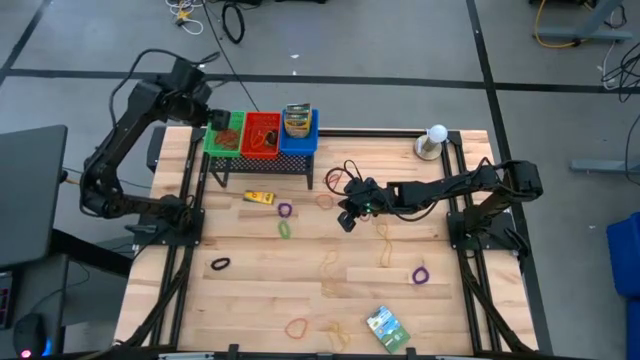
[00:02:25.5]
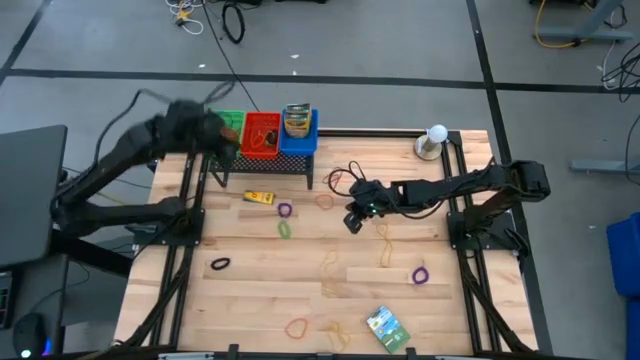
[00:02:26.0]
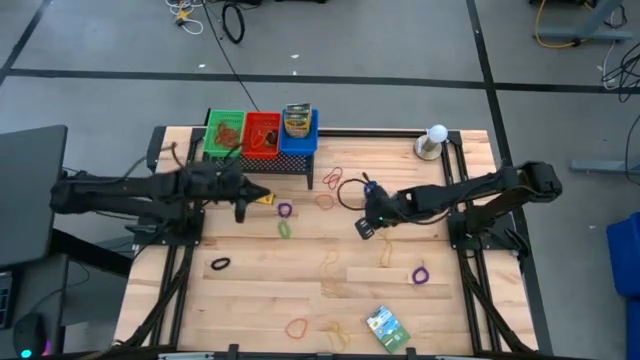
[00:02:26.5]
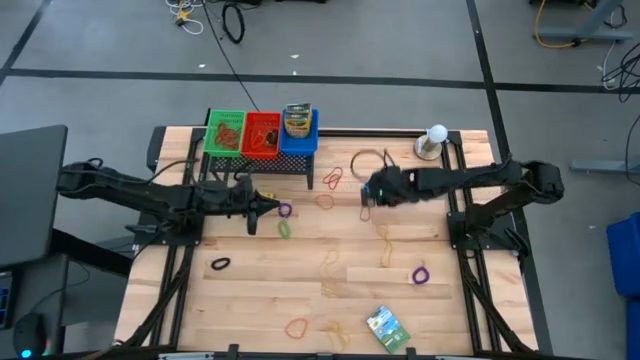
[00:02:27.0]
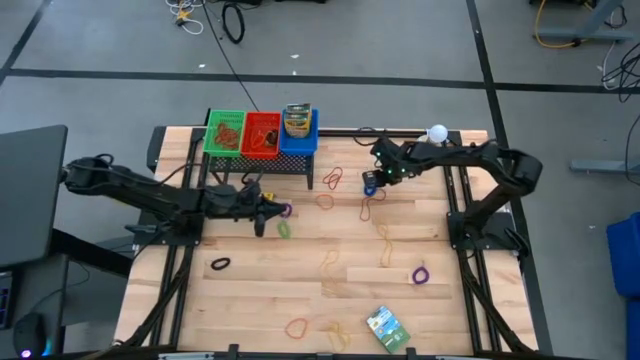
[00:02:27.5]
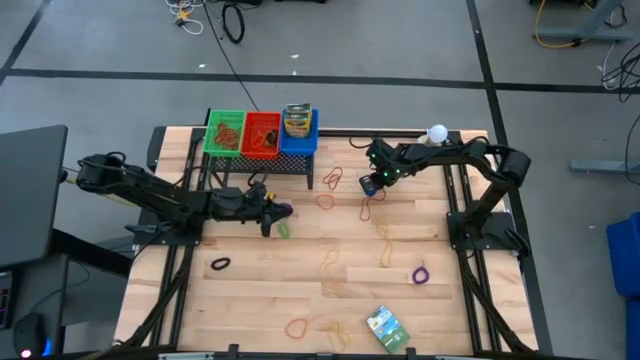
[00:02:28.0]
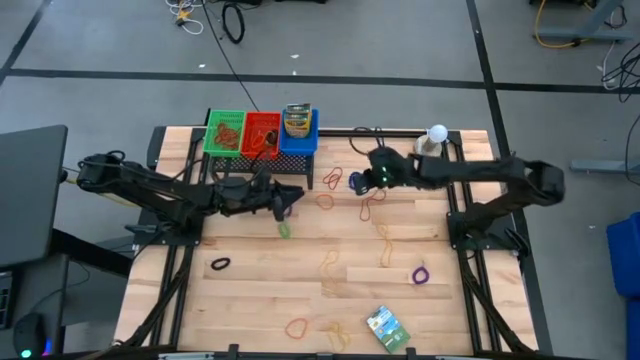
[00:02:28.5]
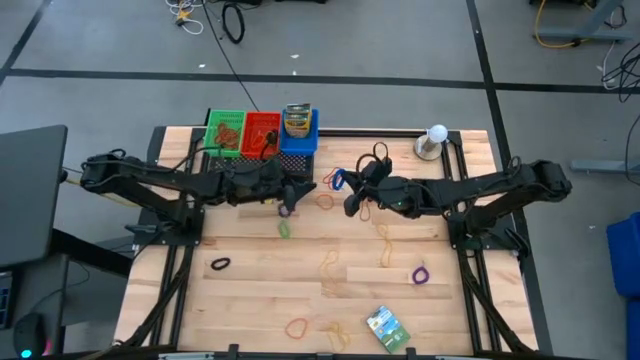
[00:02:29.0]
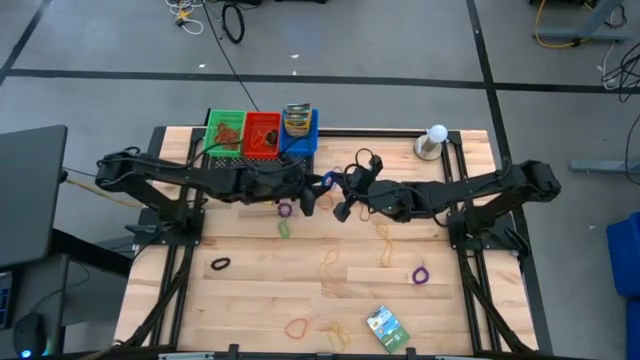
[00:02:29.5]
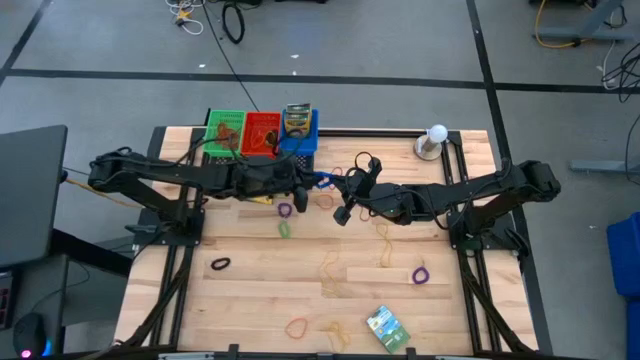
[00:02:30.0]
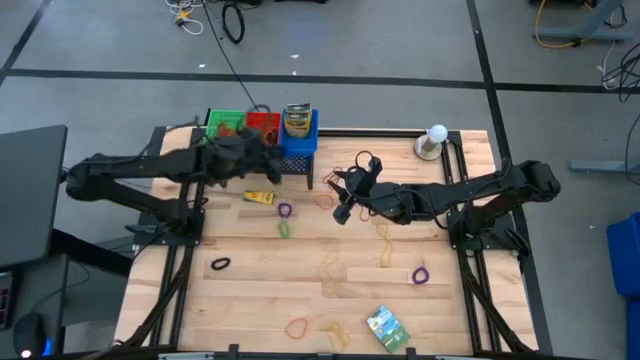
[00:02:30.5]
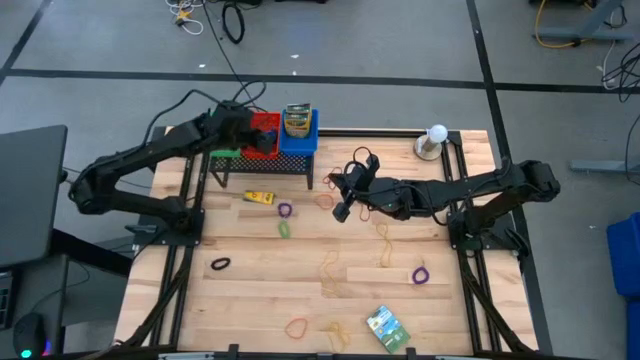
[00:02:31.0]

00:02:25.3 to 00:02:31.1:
Task: Pick & Place Office Desk Supplies
Put the blue spring rubber band into the red bin on the shelf

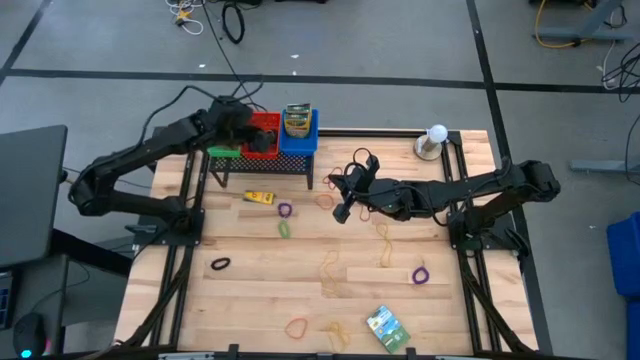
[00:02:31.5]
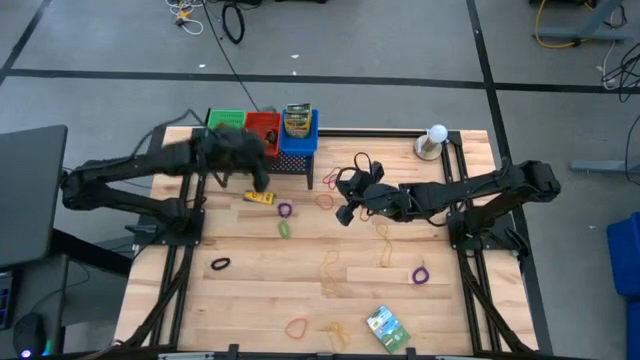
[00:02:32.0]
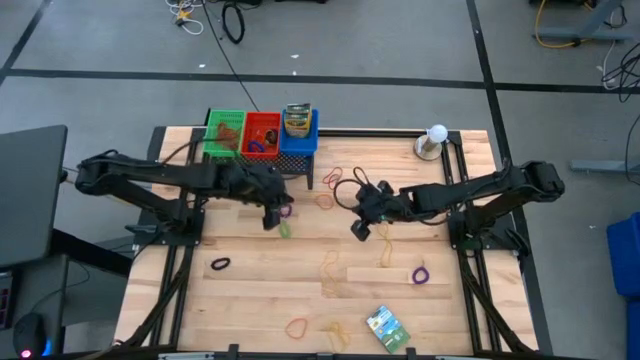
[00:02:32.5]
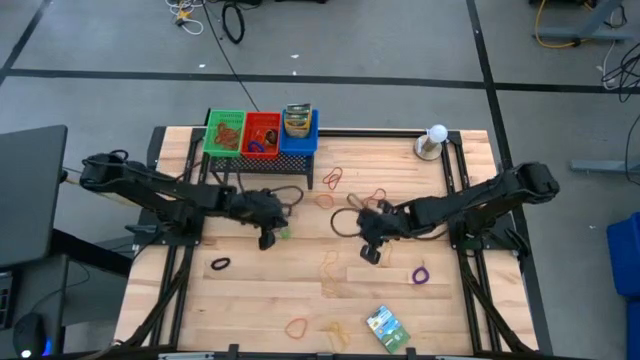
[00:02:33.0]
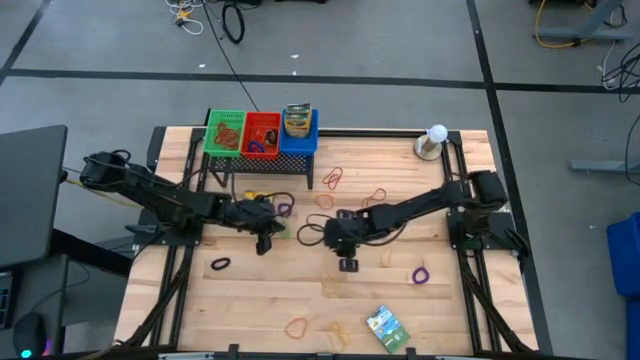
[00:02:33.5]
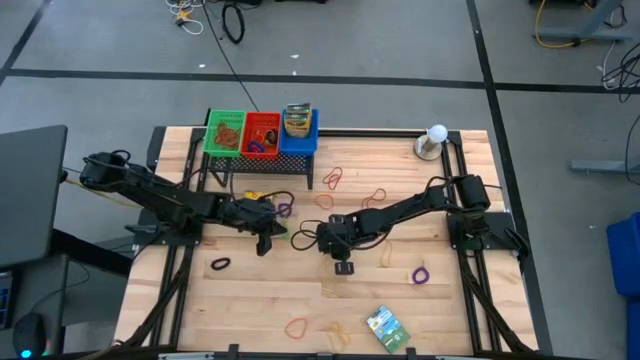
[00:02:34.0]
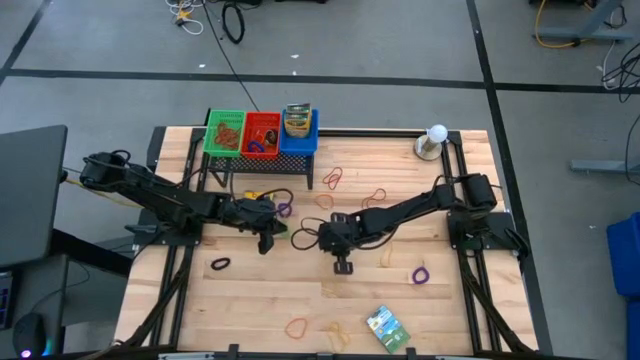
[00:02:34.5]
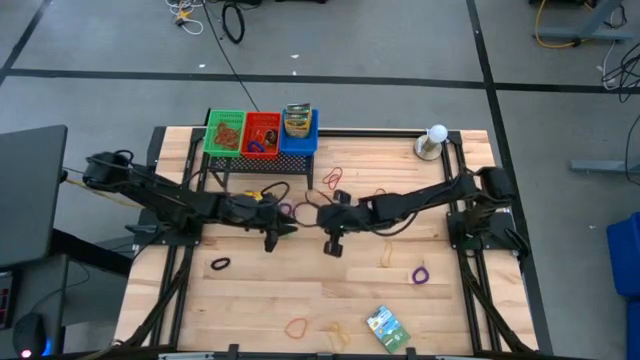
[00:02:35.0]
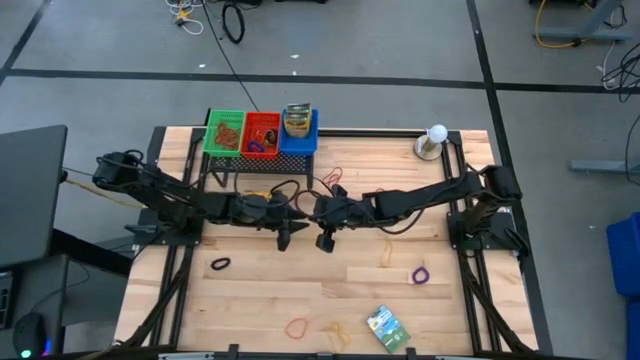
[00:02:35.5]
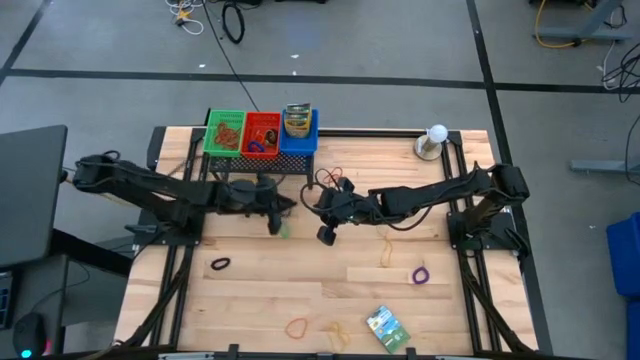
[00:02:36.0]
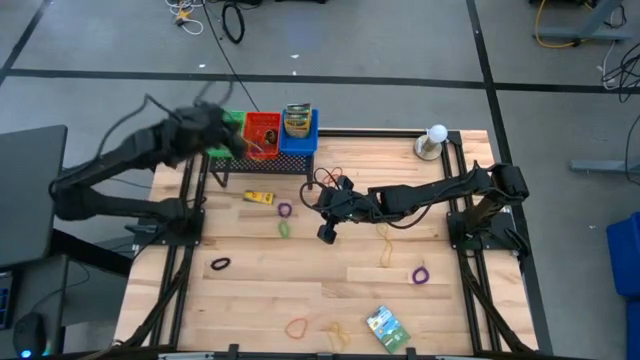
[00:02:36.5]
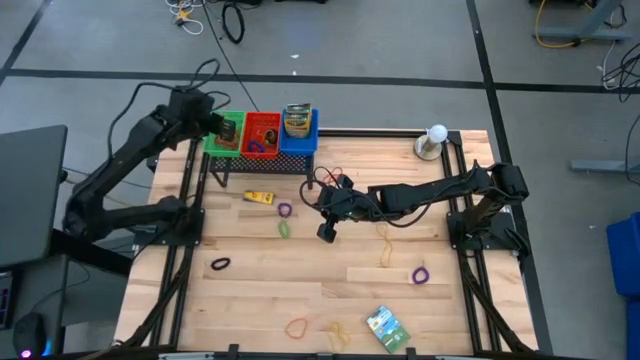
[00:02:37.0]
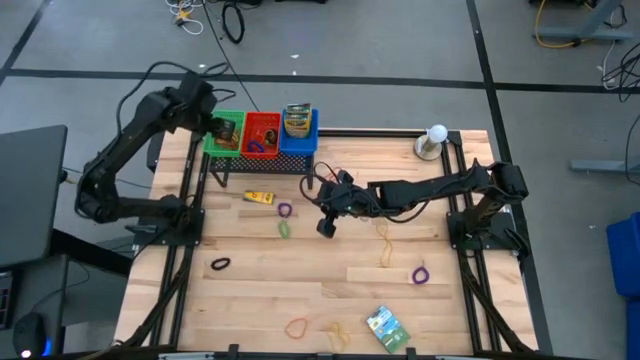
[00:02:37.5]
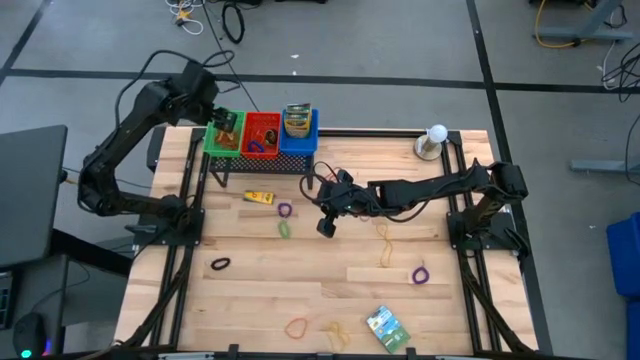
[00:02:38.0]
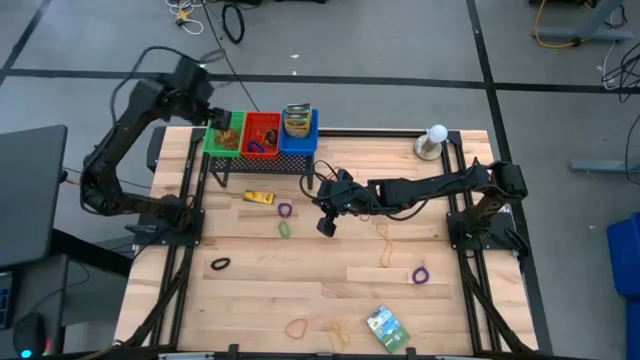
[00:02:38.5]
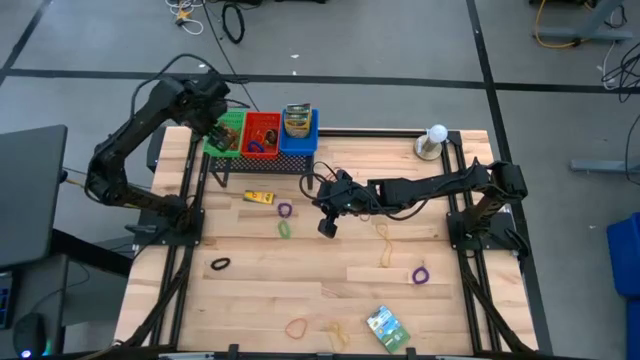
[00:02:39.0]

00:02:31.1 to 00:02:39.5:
Put the yellow rubber band into the green bin on the shelf

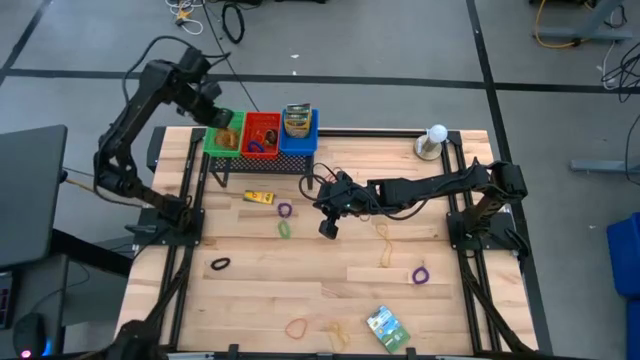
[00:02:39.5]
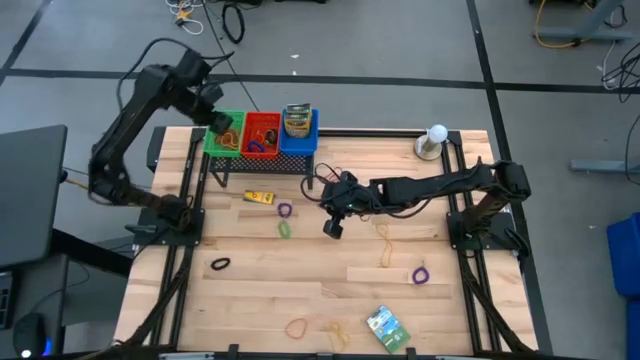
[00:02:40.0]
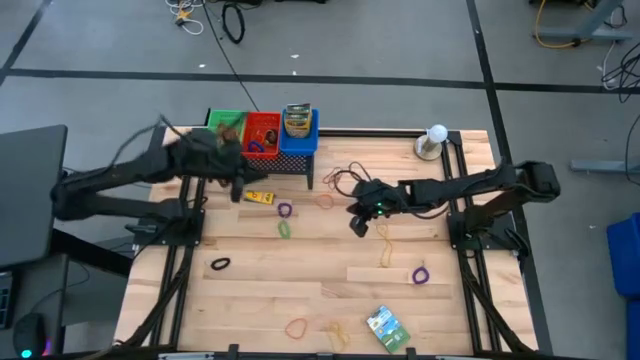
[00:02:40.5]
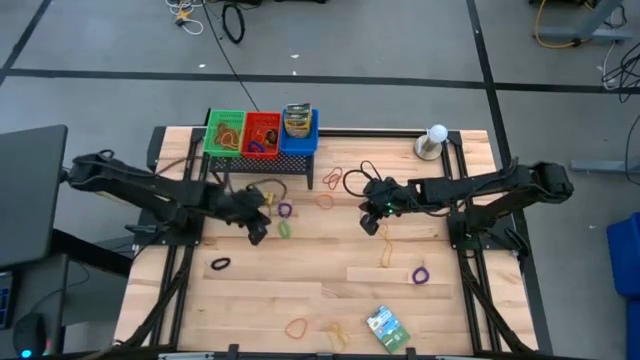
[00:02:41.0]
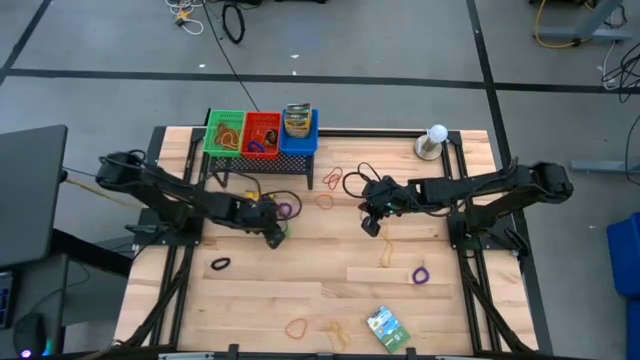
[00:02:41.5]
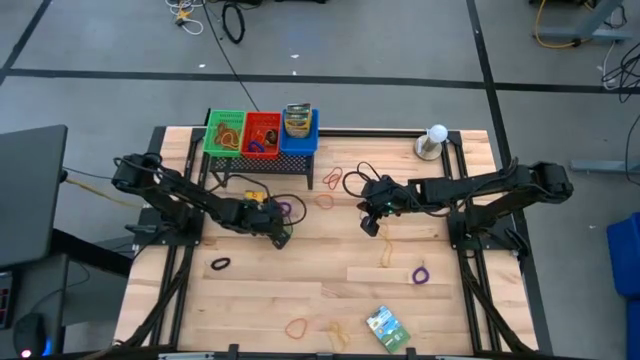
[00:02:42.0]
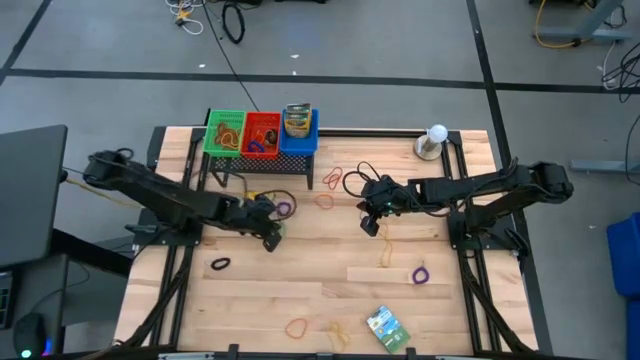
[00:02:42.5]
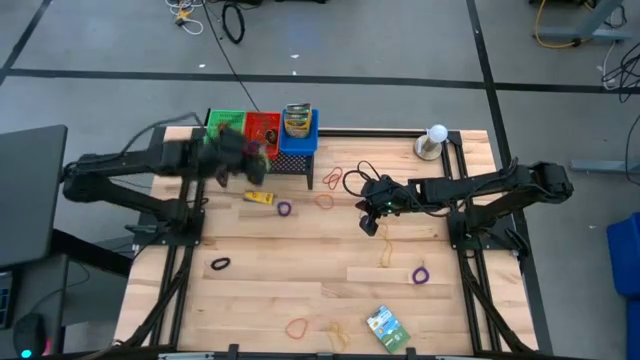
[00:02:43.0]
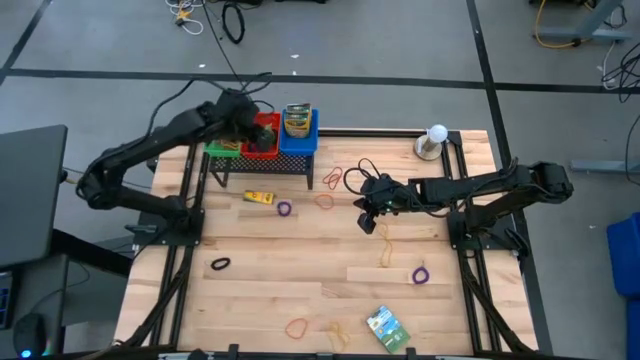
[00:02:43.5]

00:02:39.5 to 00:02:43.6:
Put the green spring rubber band into the red bin on the shelf

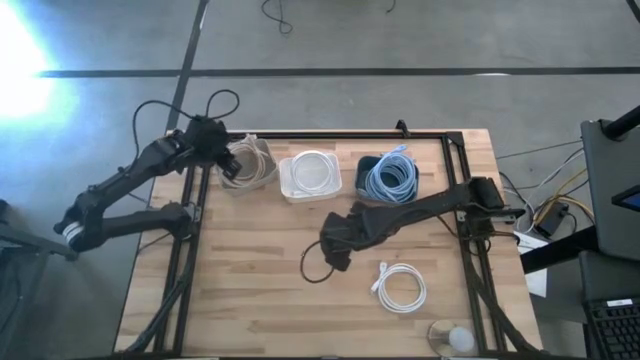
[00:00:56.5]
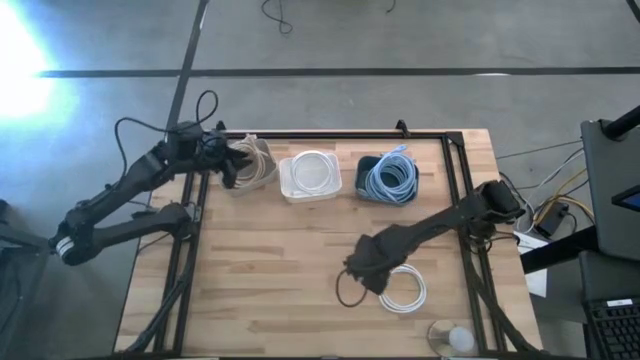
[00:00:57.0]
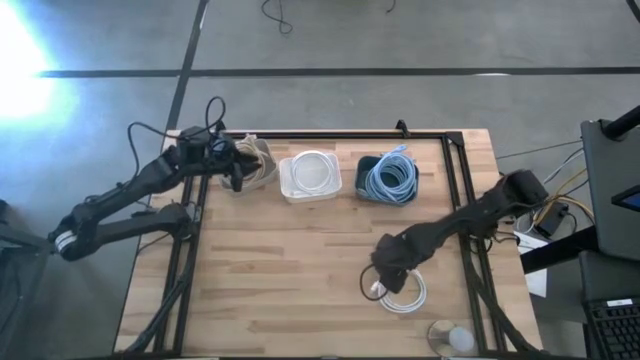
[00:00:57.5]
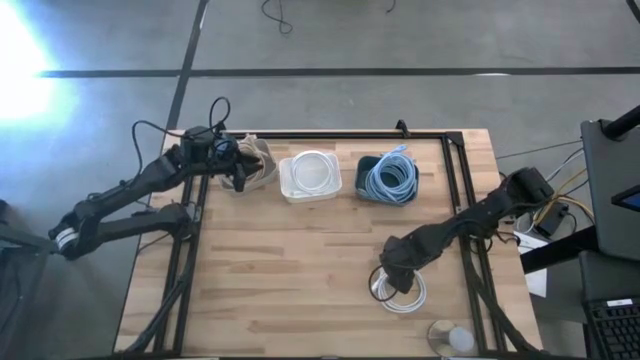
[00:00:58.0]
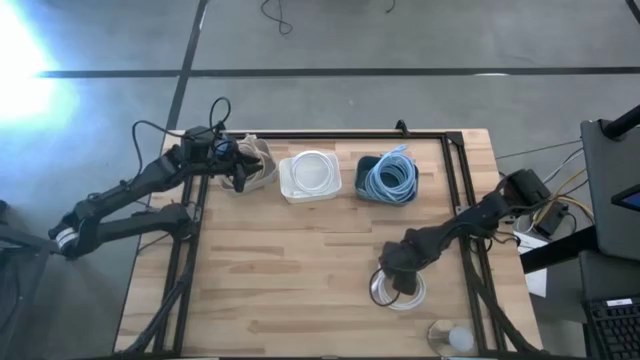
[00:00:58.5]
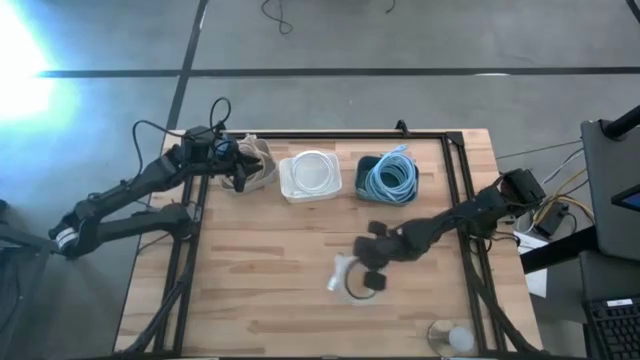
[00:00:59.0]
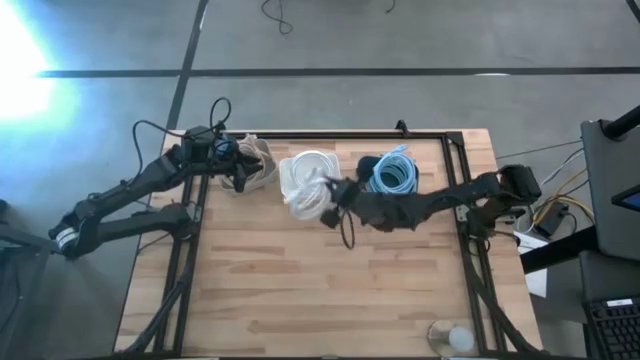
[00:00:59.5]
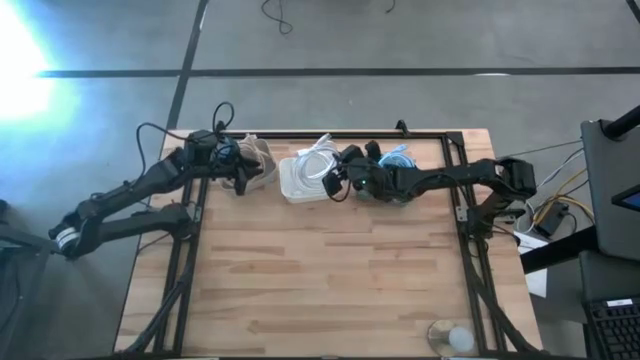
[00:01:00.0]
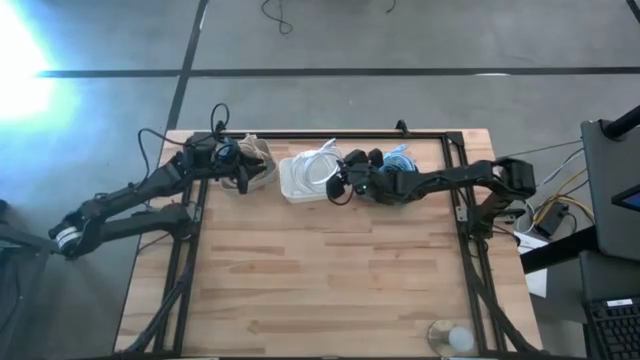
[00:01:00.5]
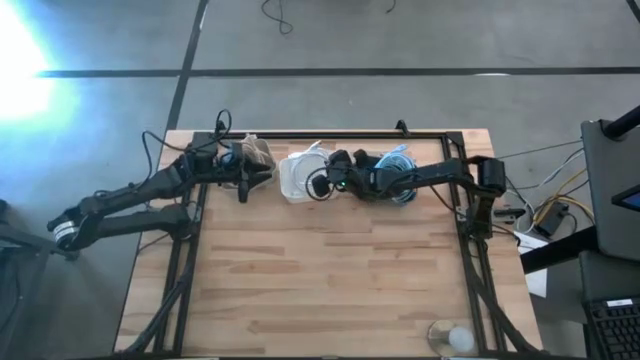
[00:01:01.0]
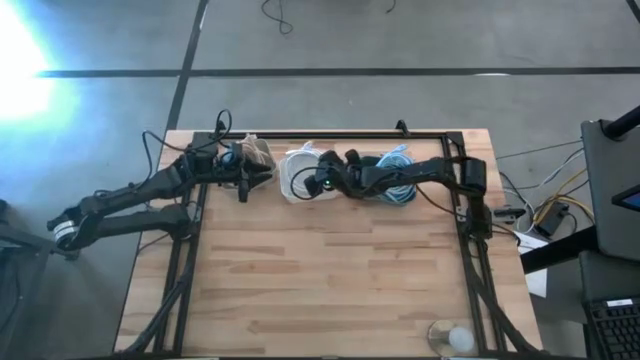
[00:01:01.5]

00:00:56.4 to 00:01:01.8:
Task: Sort HDMI cables
Put the white HDMI cable into the white bin
